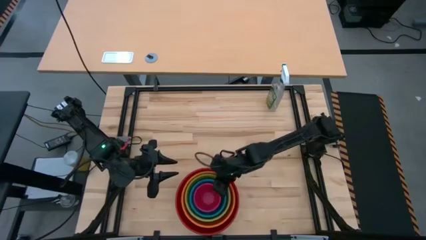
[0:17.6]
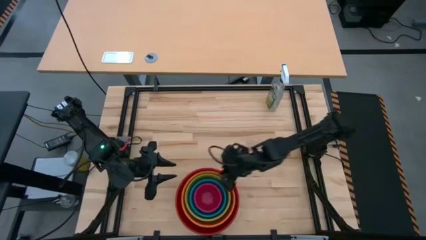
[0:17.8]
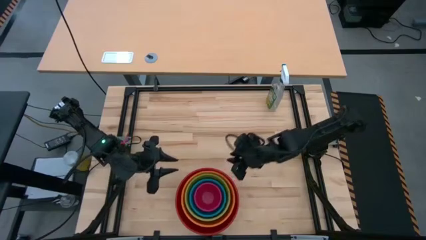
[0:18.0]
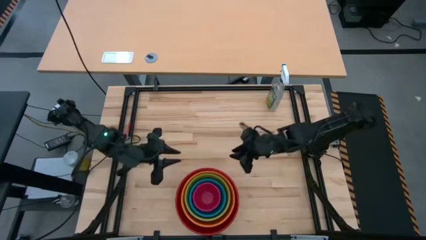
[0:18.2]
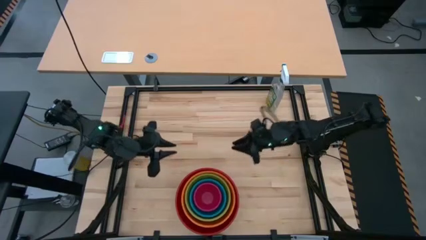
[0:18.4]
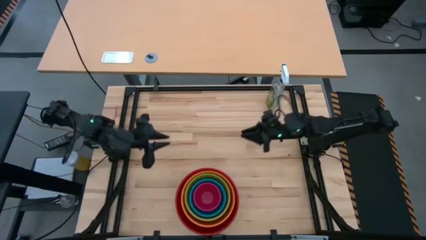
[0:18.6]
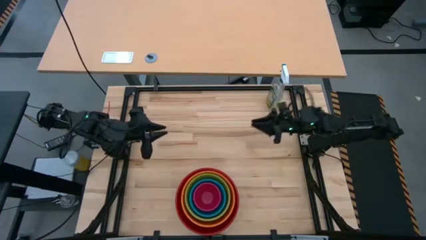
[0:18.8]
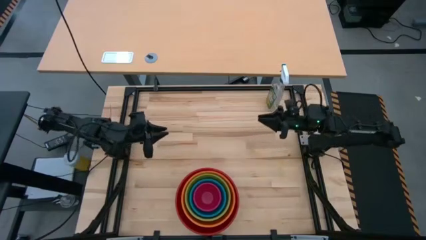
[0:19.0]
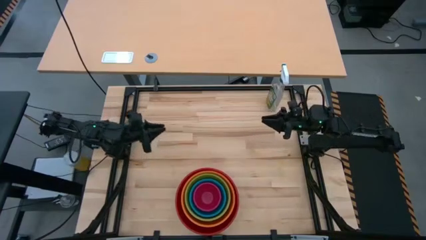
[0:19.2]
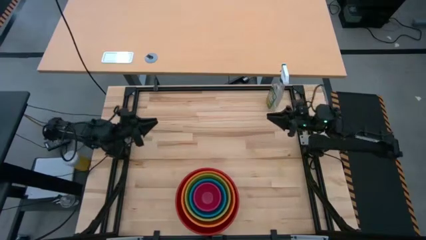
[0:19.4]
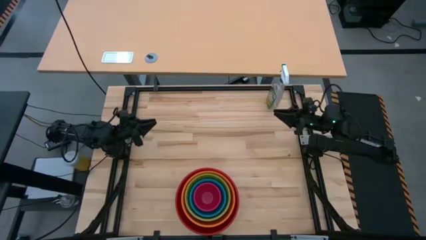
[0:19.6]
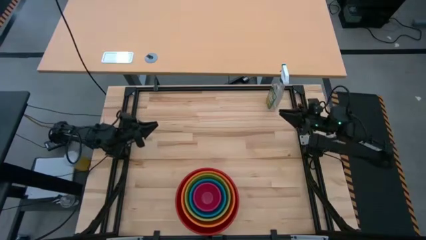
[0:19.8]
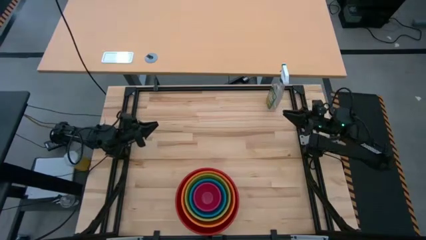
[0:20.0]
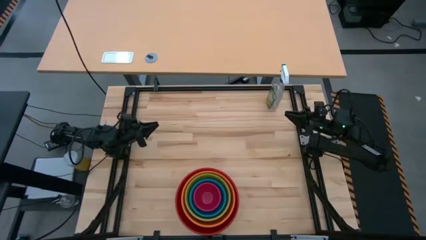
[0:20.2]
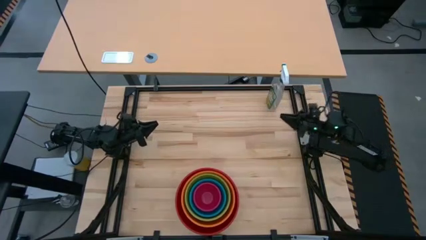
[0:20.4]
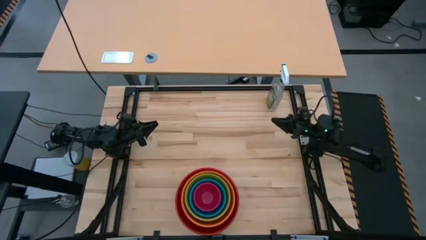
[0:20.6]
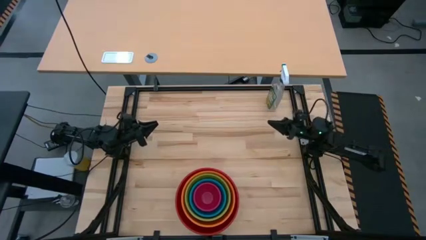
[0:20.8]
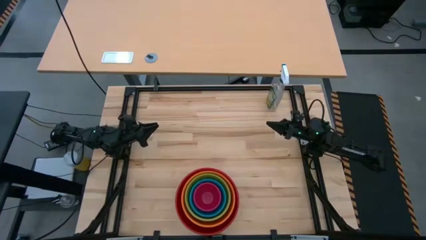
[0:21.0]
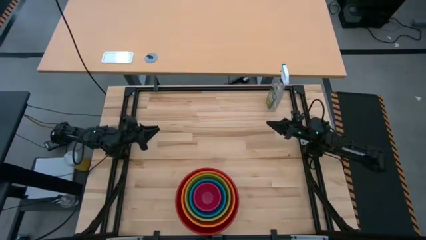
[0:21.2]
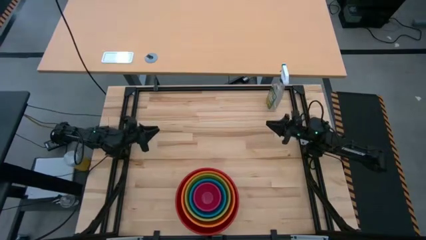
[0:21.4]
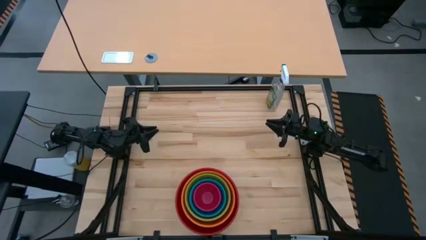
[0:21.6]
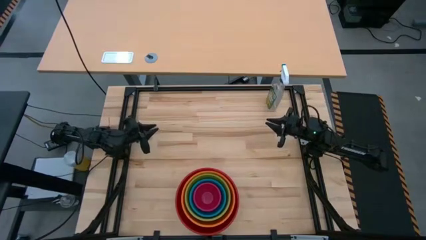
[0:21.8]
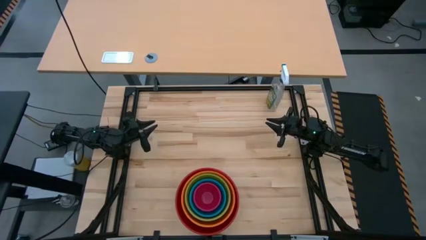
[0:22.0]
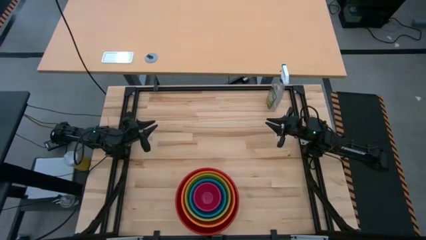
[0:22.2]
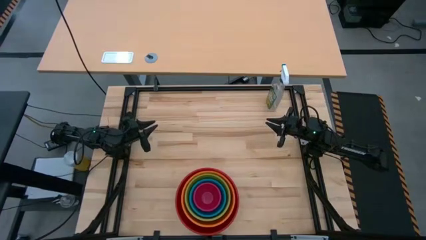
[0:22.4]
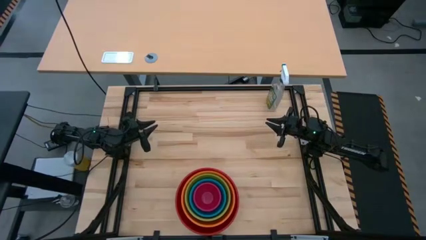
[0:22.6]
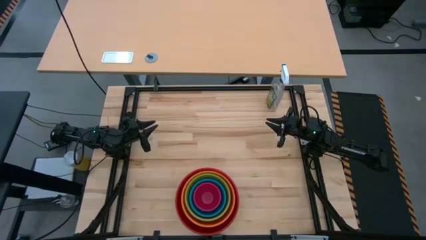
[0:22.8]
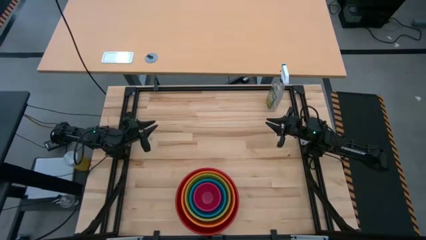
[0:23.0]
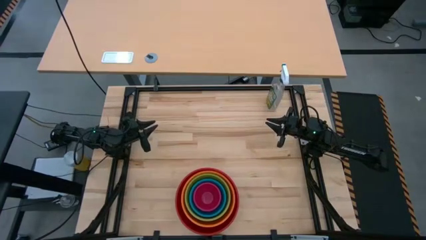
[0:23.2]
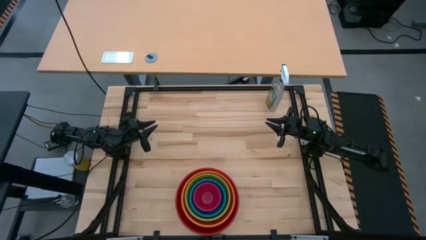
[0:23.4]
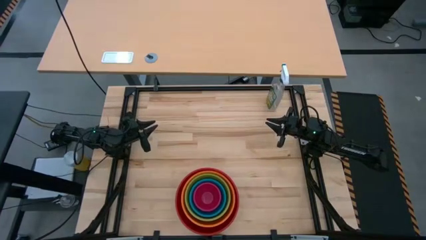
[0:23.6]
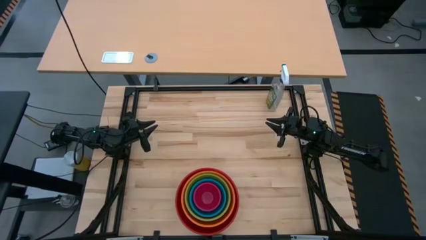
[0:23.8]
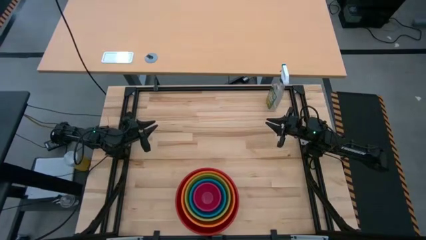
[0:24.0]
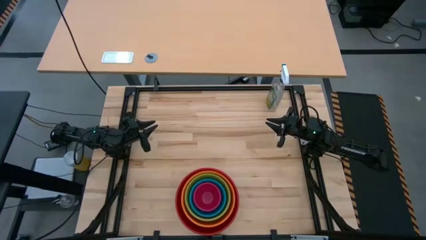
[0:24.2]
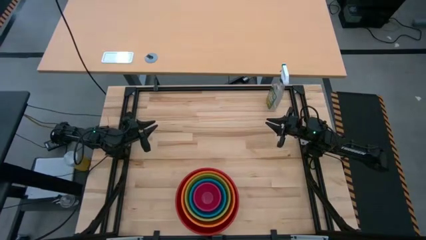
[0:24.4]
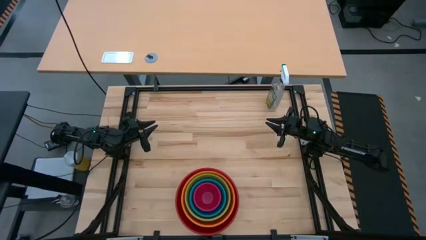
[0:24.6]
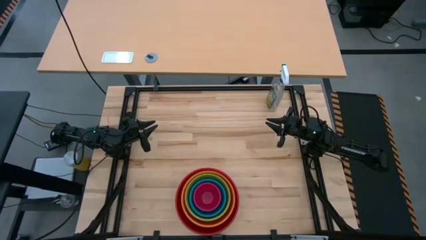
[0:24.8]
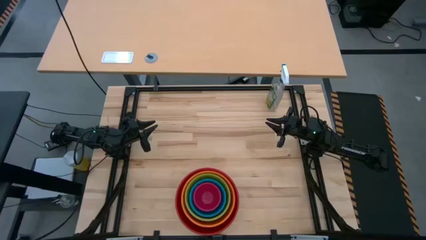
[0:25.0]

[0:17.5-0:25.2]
Return to Home Position

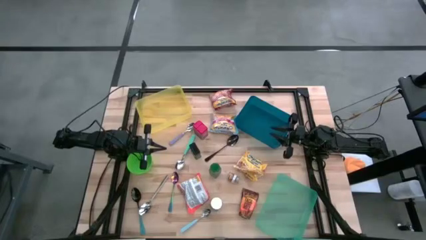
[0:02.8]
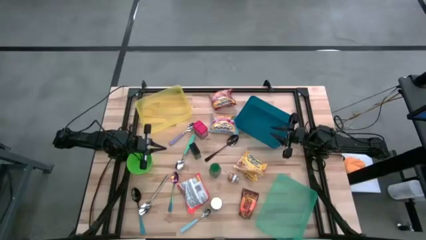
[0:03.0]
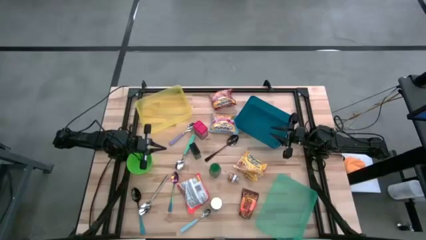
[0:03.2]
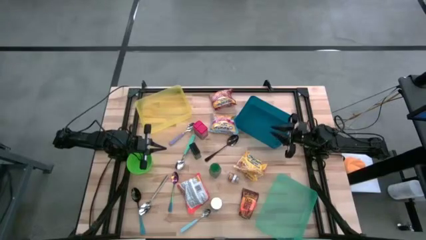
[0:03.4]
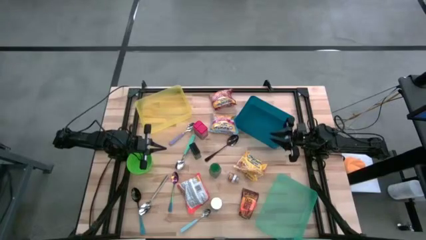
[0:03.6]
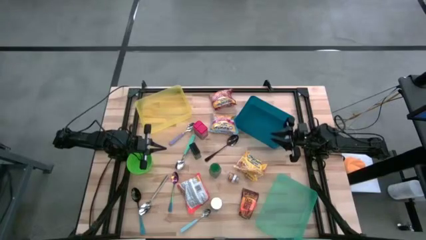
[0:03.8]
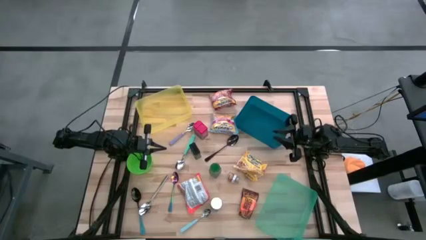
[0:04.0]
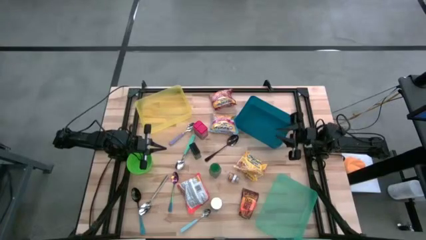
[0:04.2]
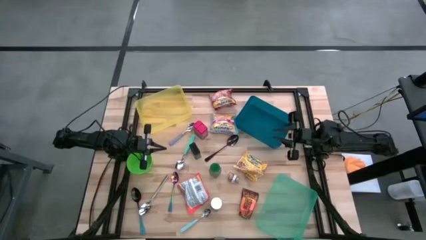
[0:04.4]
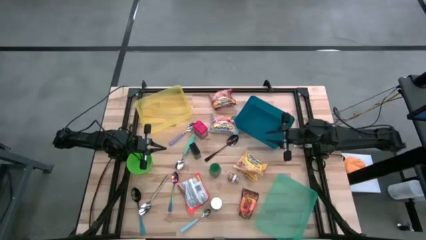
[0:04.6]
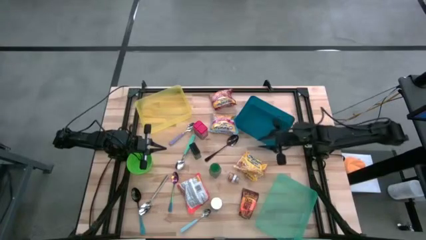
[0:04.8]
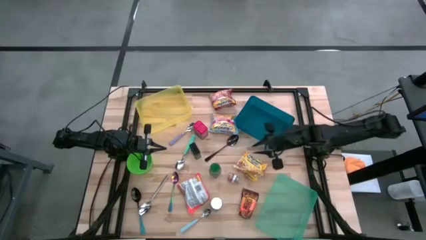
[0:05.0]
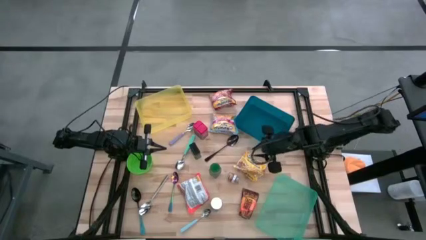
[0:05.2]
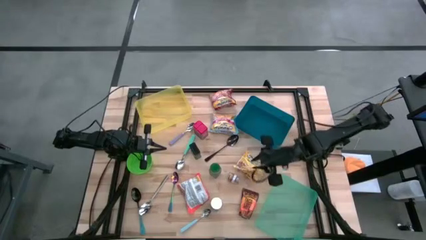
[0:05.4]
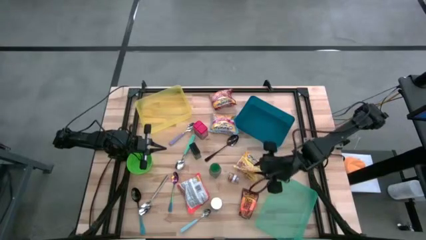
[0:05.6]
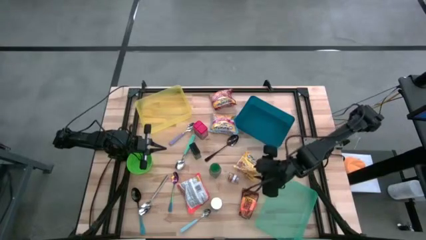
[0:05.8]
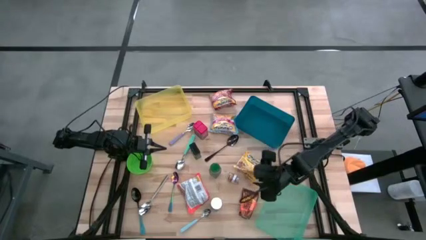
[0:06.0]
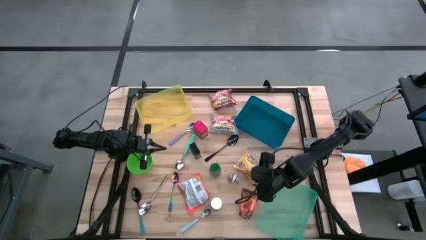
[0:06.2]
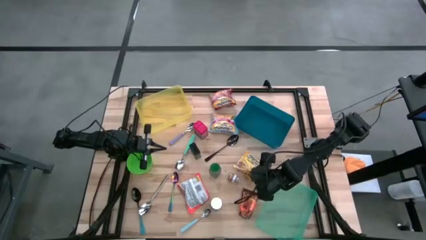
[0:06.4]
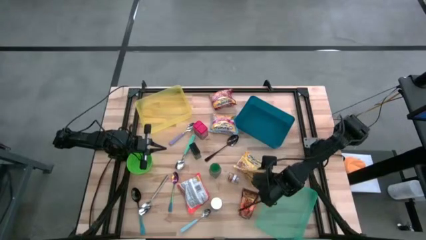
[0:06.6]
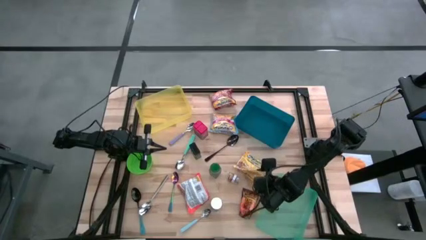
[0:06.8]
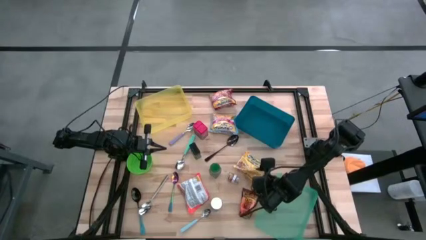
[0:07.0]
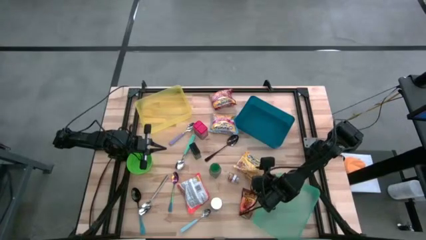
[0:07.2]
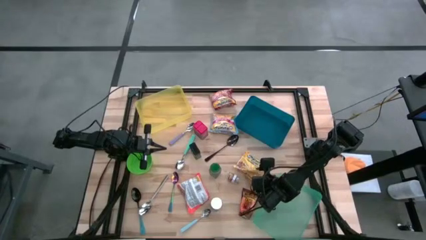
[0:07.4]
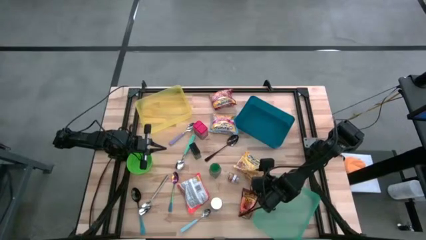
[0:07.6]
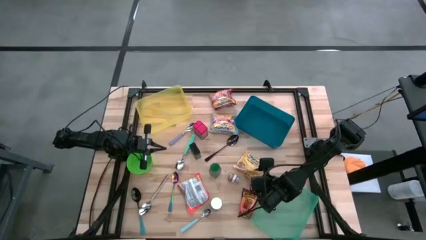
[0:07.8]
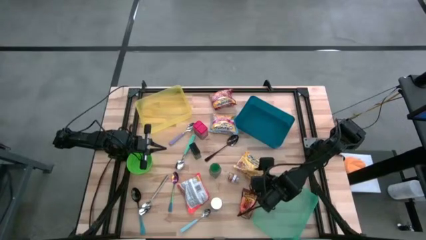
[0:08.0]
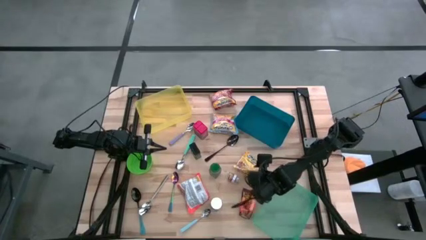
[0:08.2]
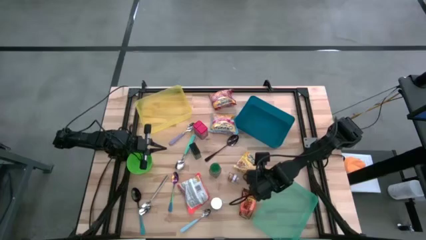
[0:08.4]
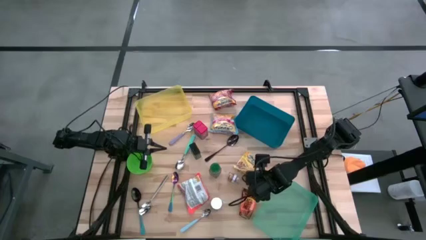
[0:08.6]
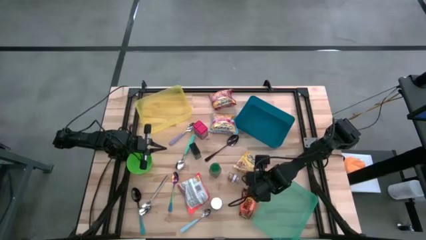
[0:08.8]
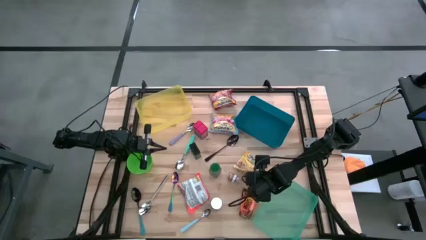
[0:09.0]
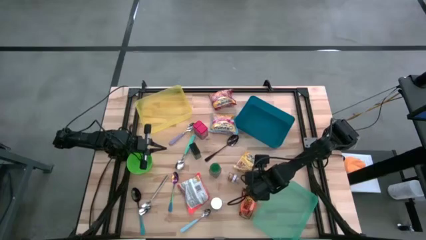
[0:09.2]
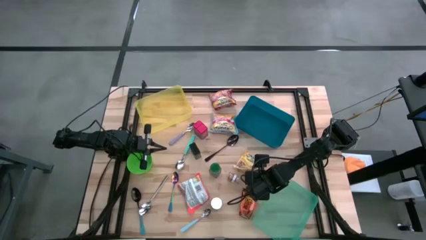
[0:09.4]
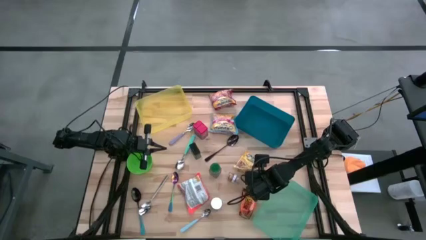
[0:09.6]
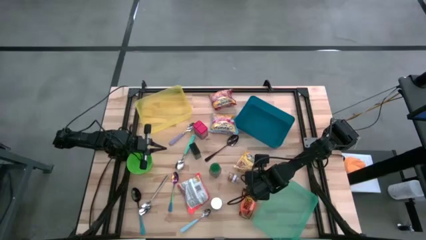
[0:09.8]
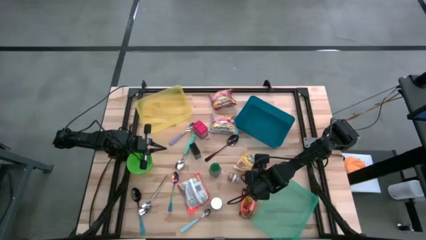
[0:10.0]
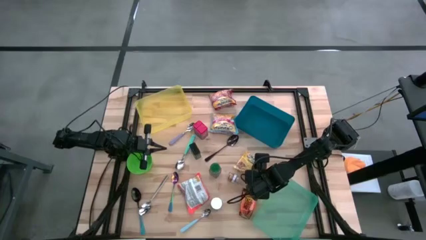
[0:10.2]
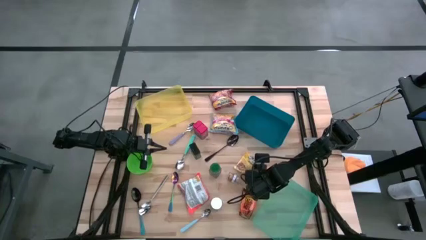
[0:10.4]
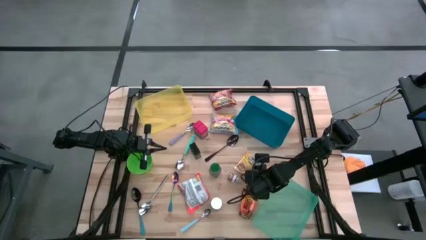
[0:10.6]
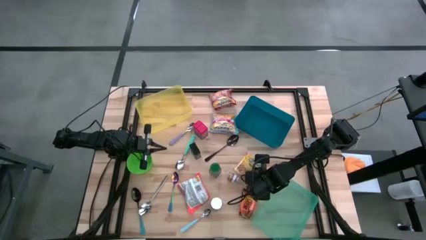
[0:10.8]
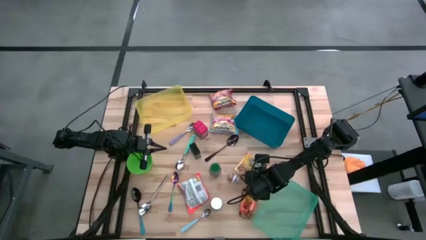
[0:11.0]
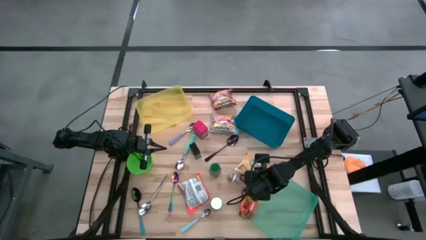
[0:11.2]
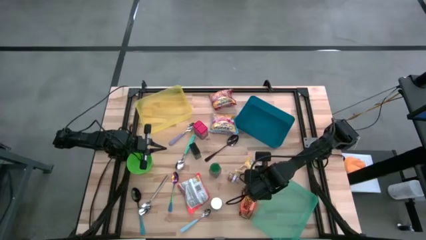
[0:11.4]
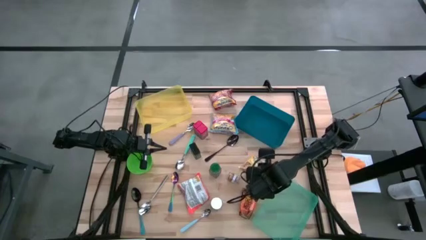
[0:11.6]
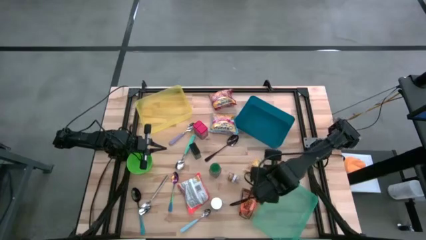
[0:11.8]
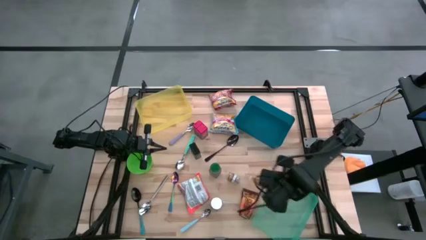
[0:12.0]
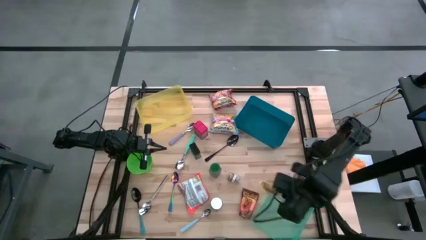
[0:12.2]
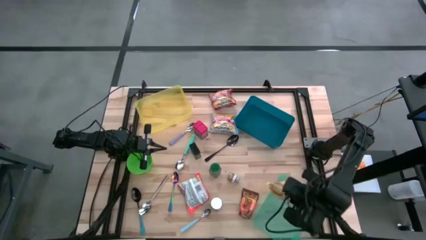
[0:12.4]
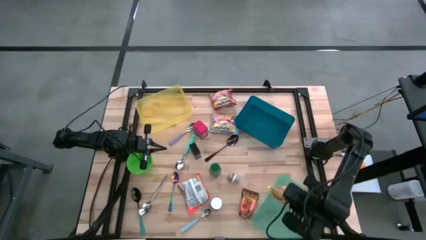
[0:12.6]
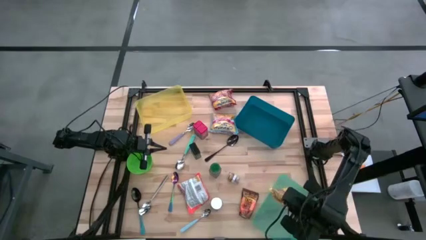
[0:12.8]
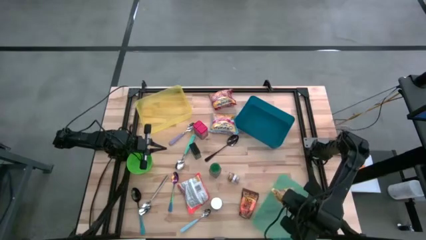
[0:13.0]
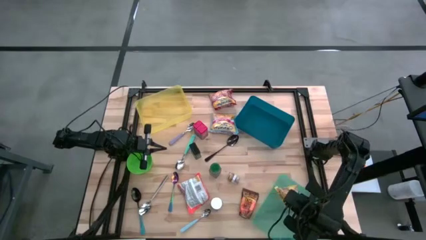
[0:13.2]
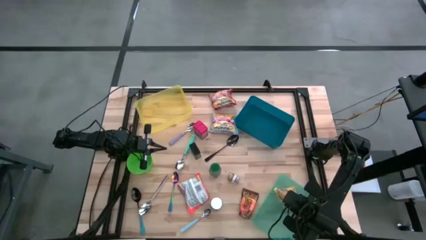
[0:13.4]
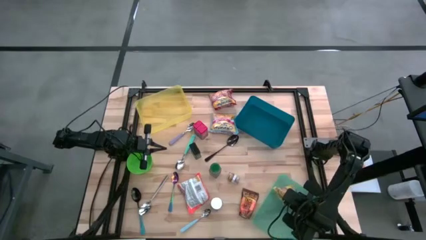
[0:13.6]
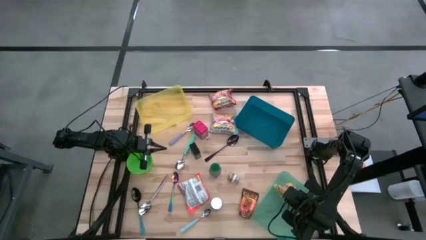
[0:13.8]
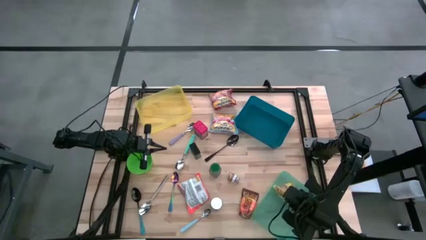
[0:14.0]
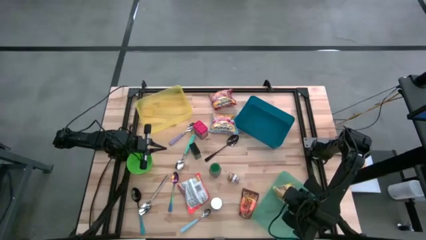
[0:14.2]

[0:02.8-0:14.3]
Put the yellow noodle pack into the green bin
